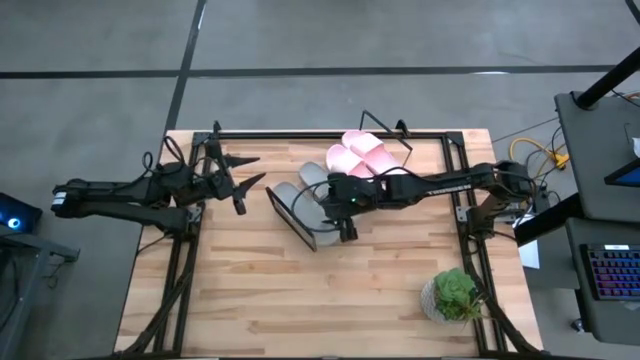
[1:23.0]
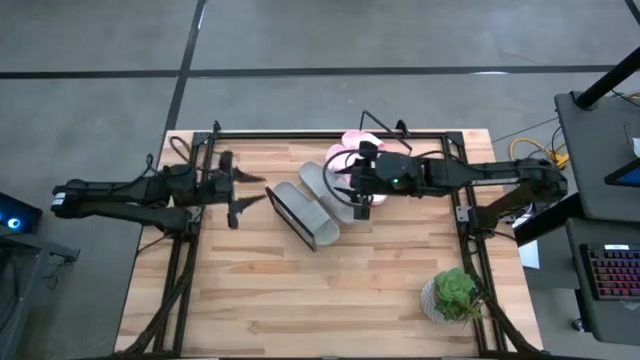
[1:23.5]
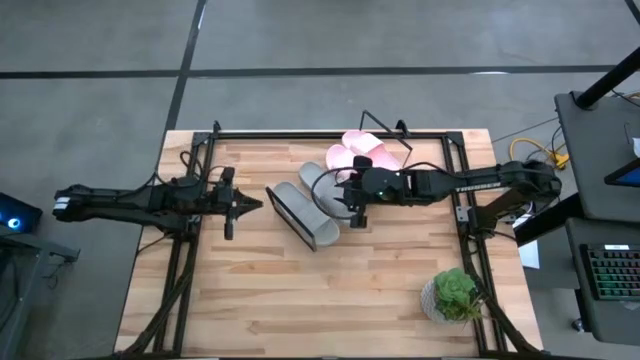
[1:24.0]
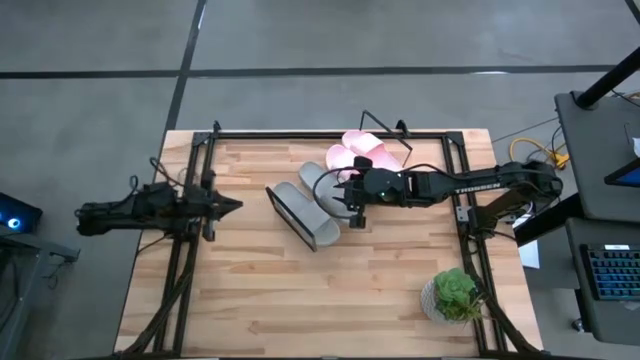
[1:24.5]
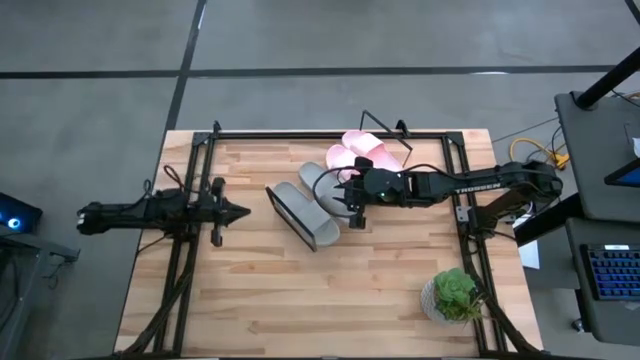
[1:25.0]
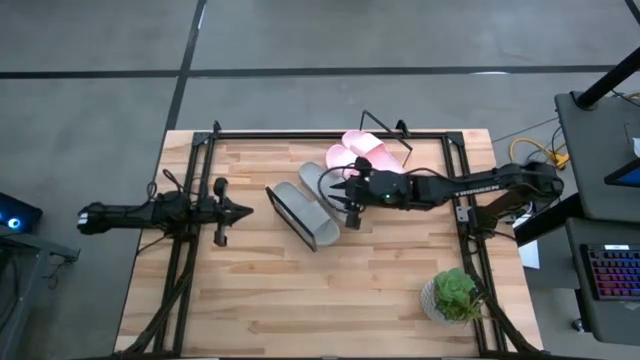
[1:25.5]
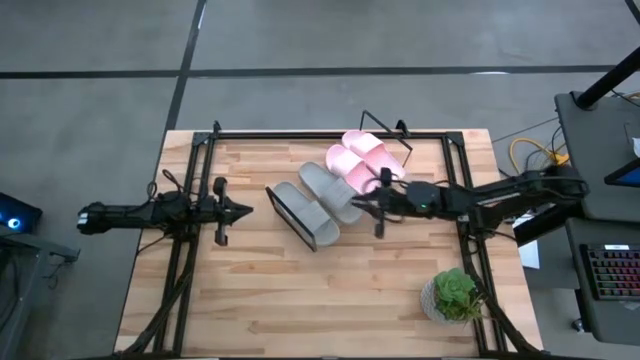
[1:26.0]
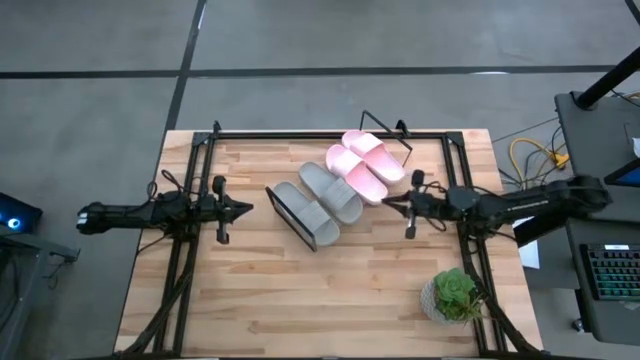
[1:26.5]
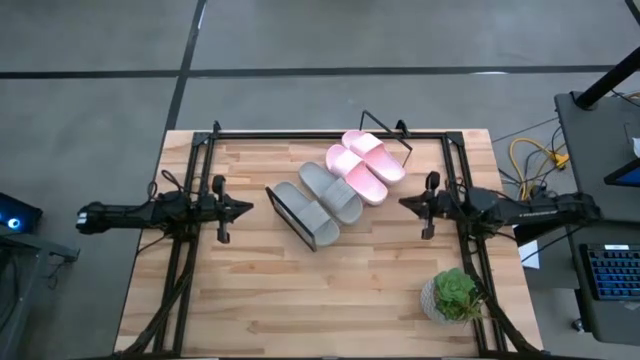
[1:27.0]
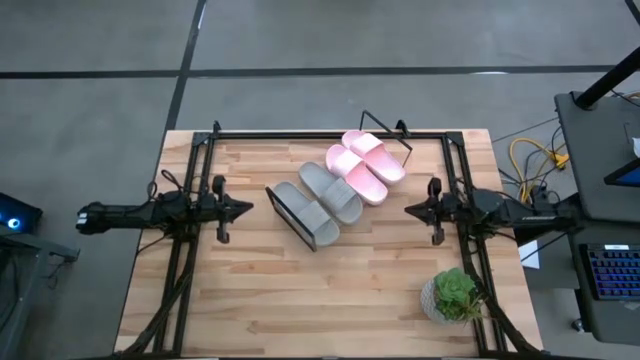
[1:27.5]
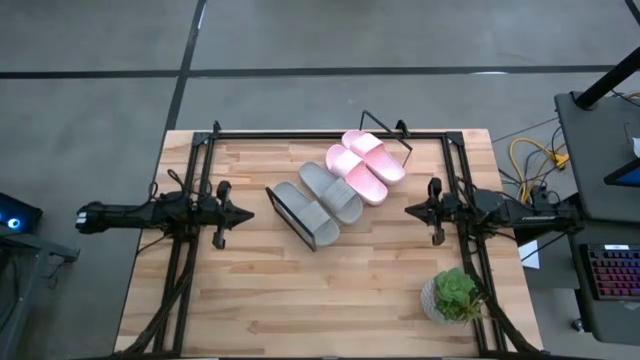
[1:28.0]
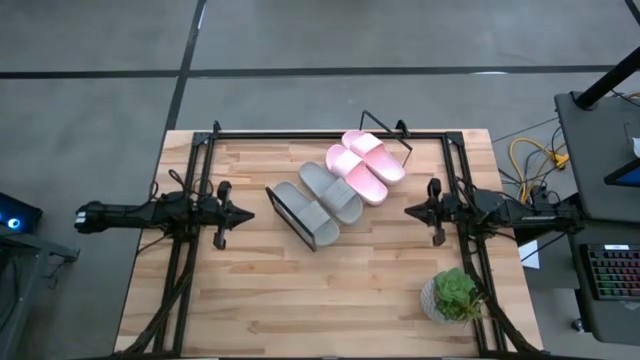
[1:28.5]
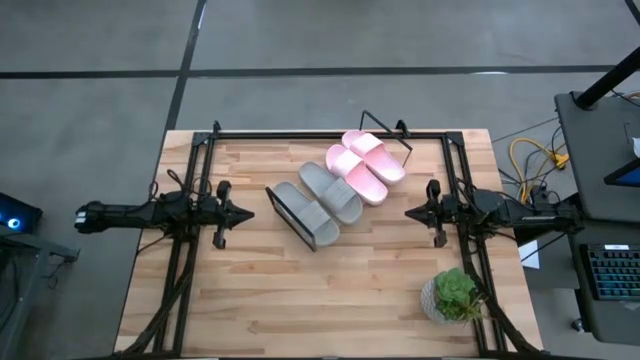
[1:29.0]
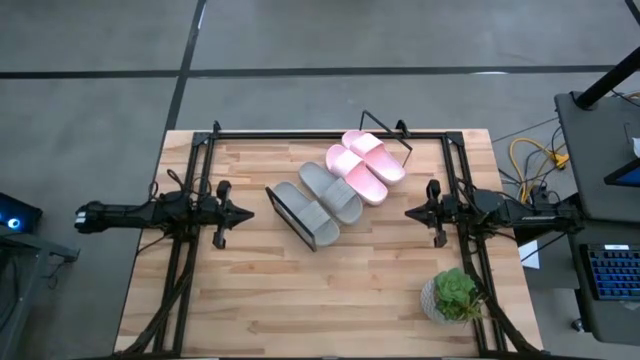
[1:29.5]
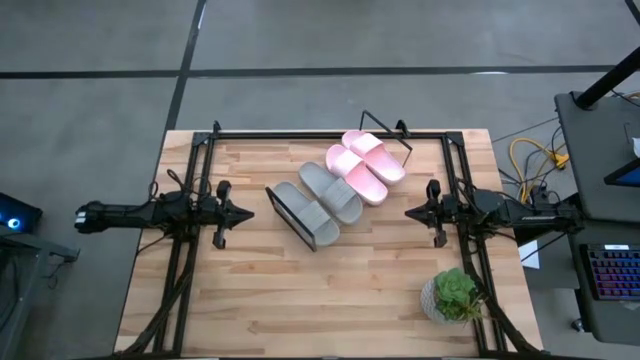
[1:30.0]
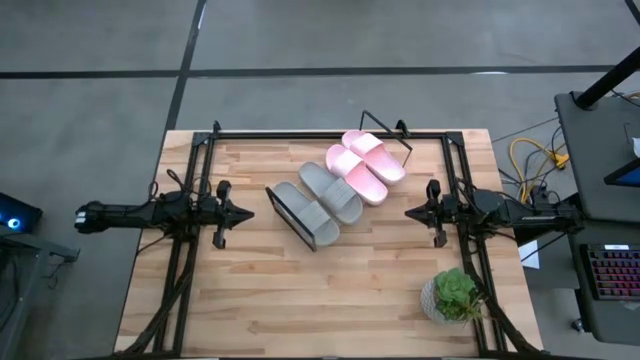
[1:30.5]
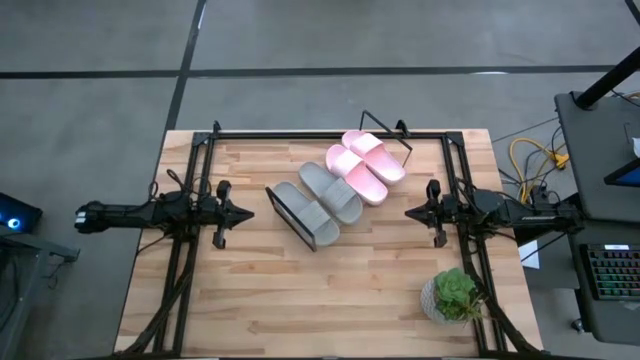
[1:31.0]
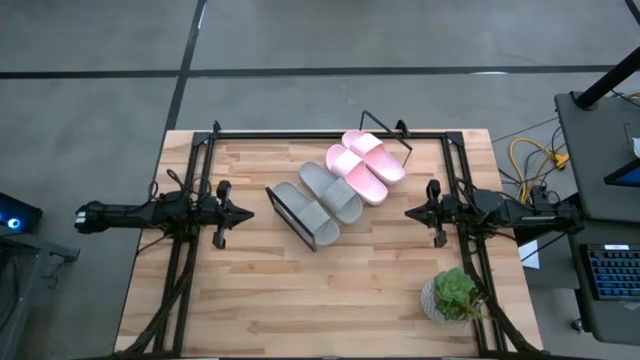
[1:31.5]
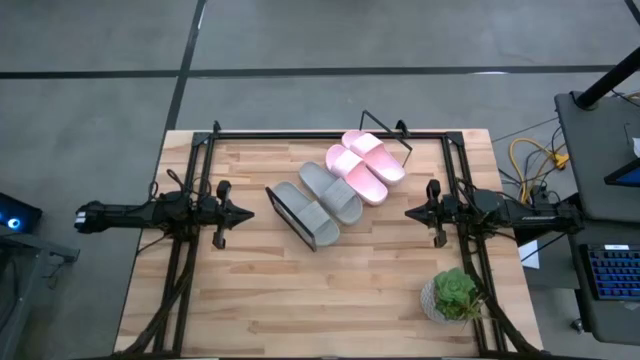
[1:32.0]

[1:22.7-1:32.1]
Task: Pick and place slides into the shelf
Return to Home Position

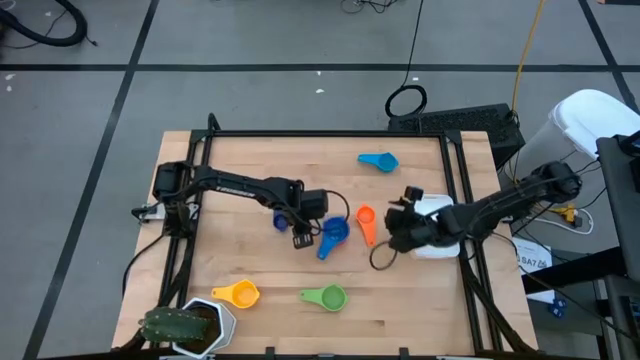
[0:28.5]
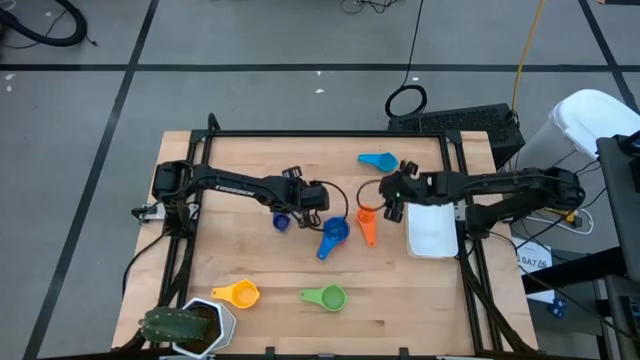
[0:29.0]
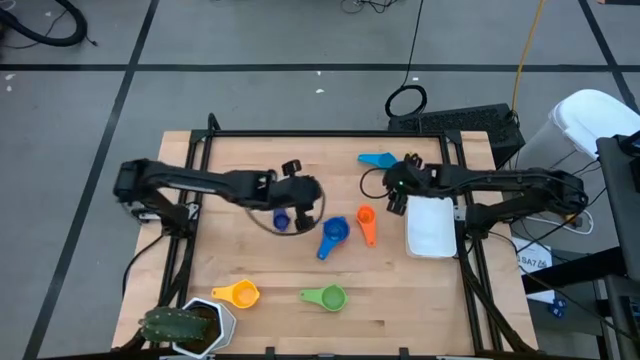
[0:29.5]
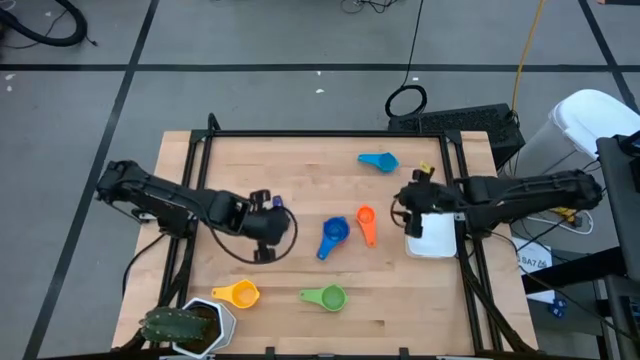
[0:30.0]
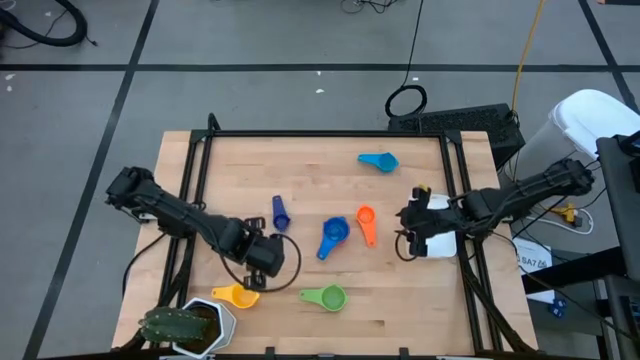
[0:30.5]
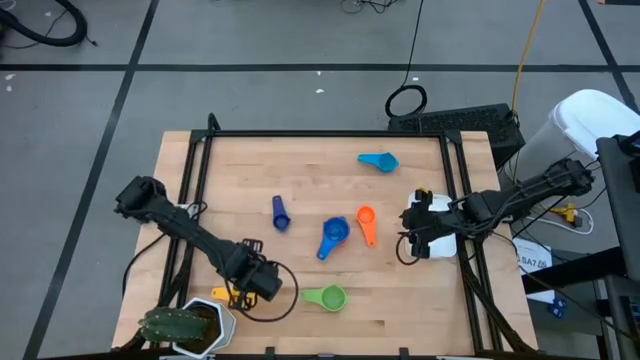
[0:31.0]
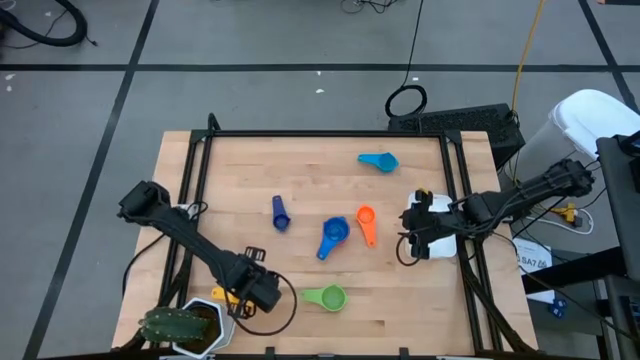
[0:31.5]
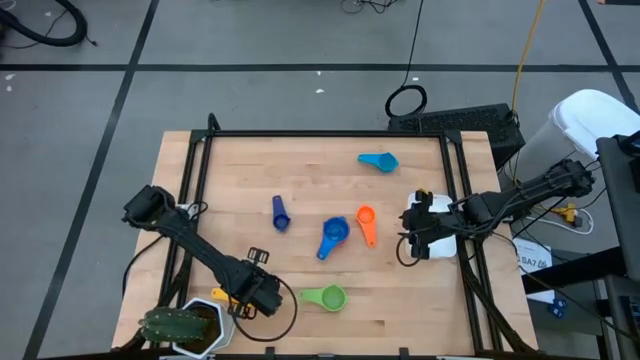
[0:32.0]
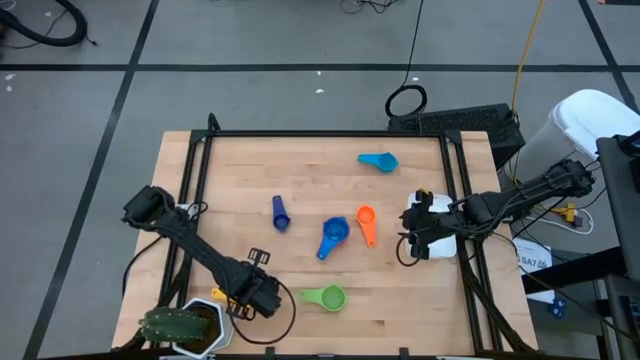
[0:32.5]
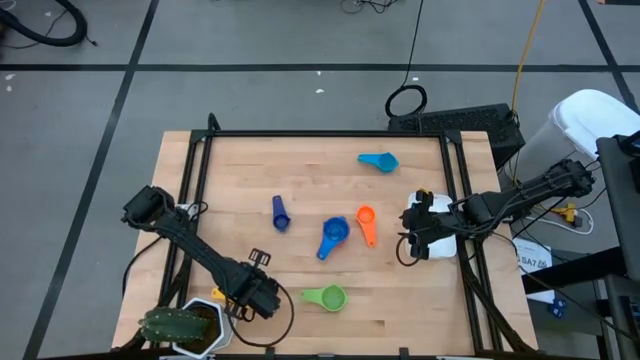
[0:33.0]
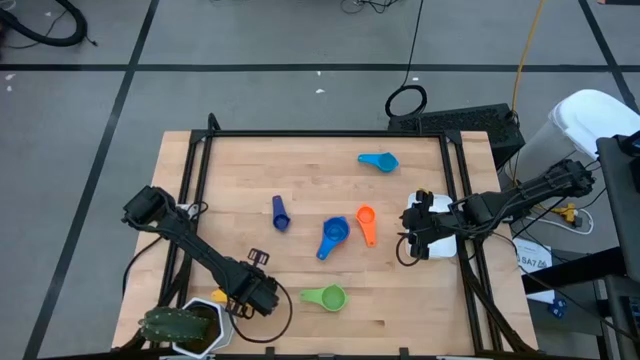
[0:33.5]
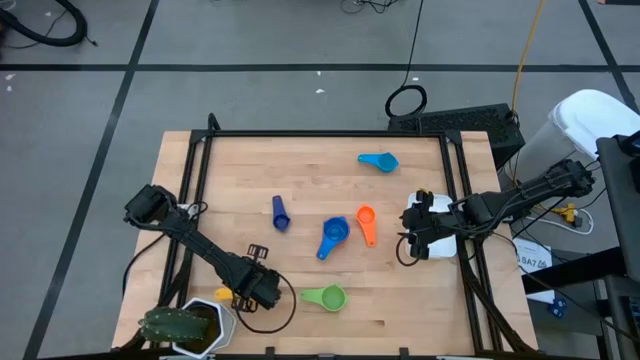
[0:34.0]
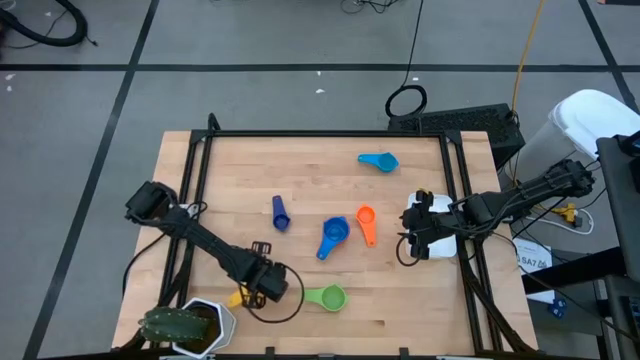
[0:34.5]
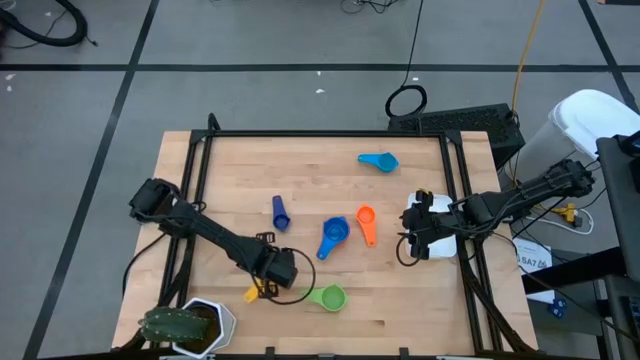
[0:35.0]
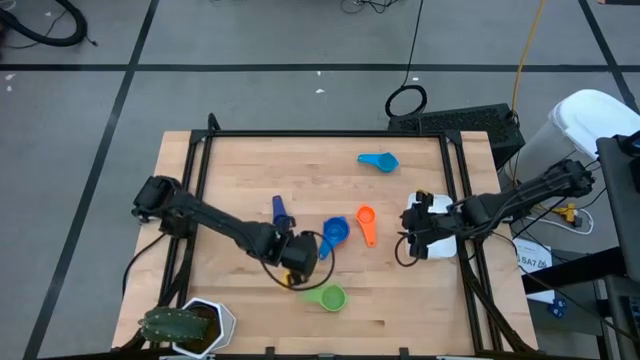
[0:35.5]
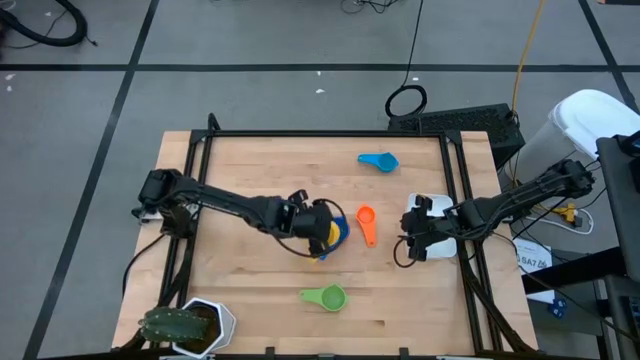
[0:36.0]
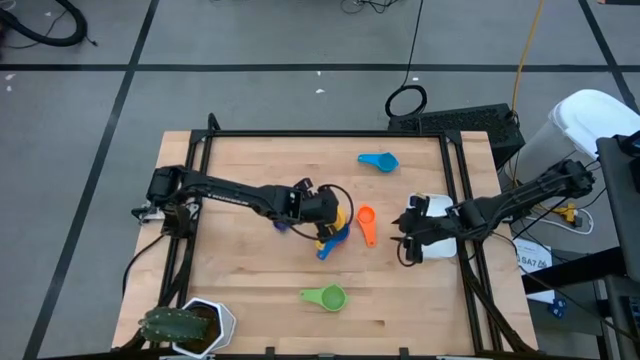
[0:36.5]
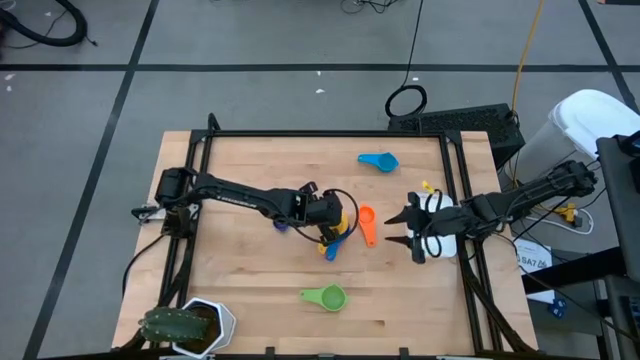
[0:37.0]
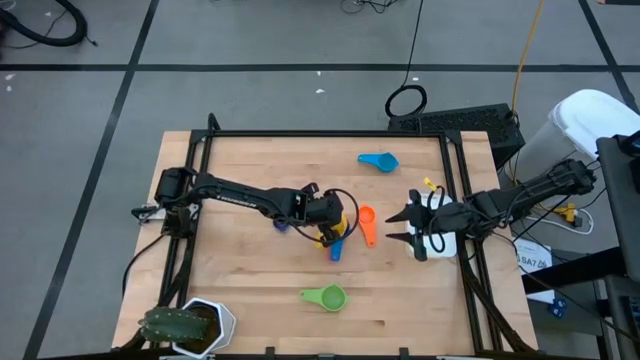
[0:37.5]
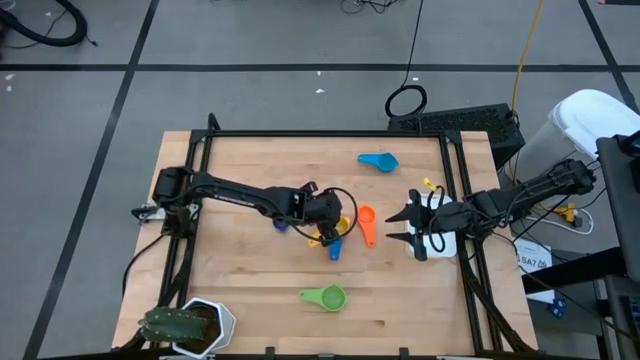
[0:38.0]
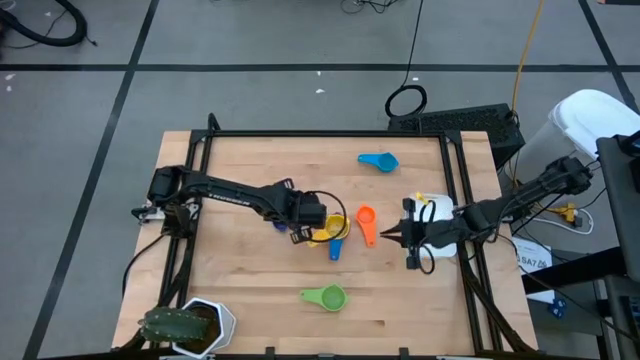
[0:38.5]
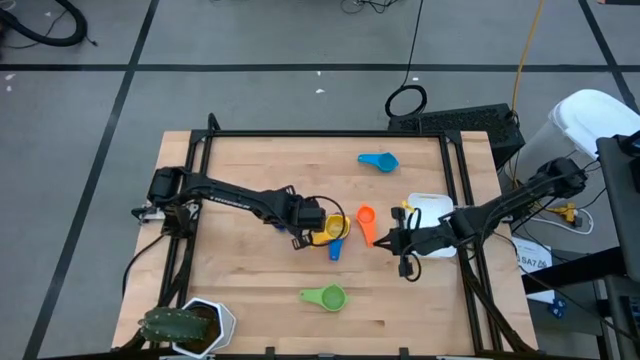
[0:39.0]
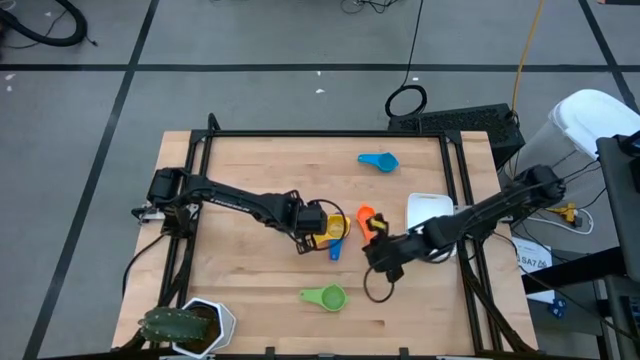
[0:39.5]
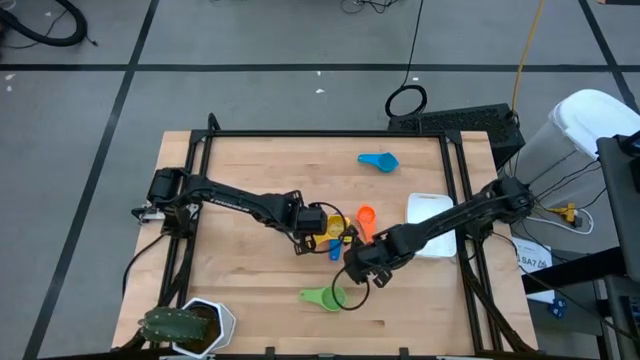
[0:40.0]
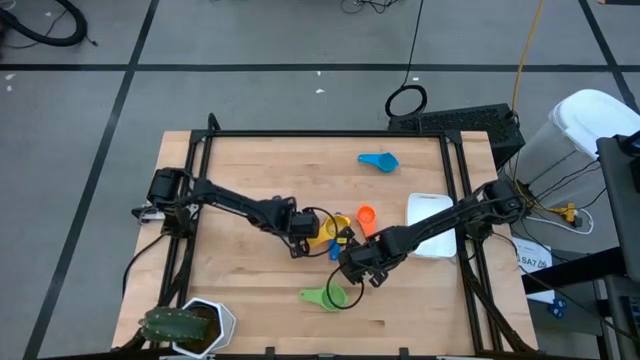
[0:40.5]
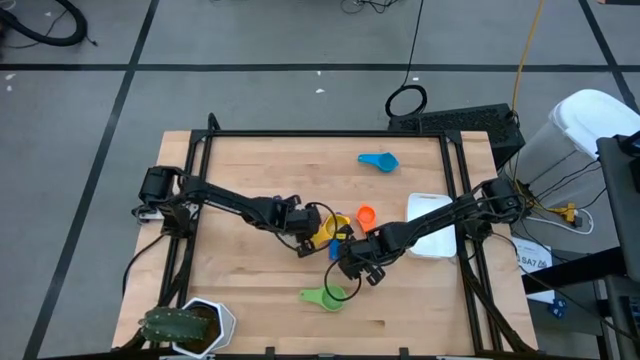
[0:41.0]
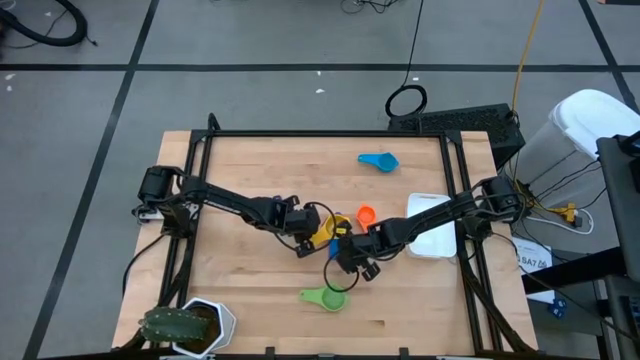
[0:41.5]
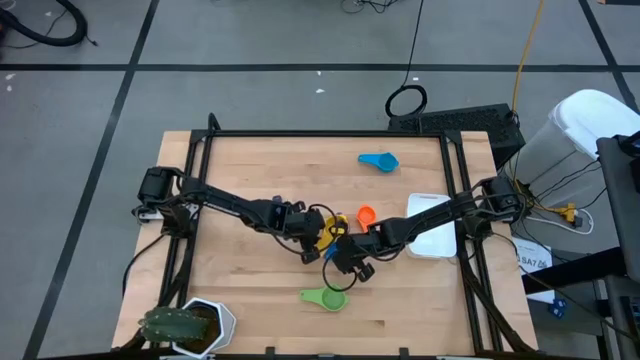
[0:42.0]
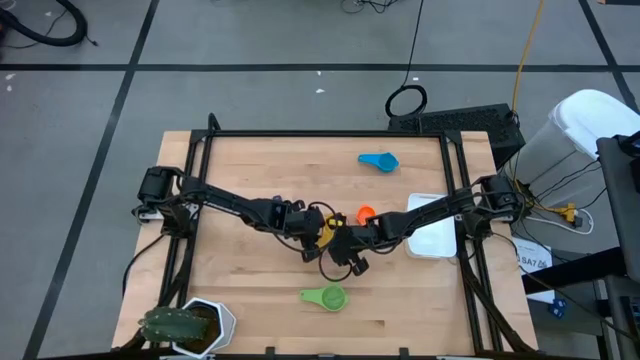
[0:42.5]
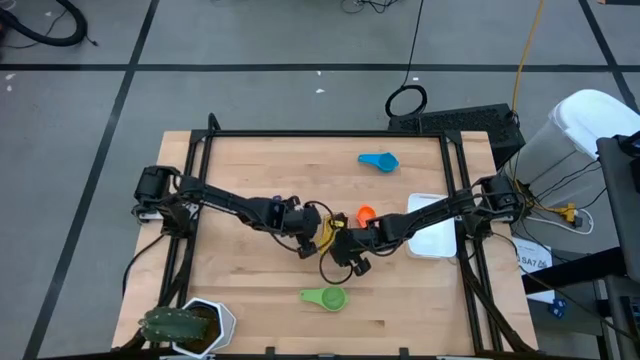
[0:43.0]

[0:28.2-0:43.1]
Task: Nest measuring cups in basket
Stack the yellow measuring cup on top of the blue measuring cup
